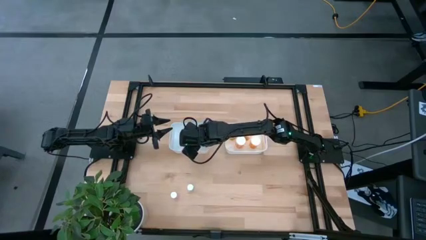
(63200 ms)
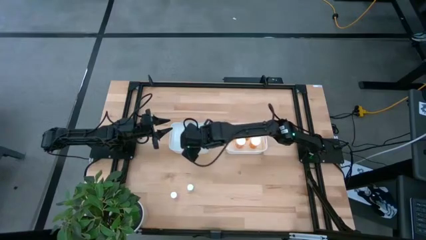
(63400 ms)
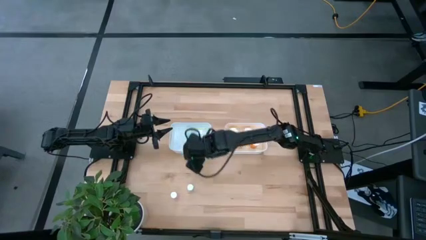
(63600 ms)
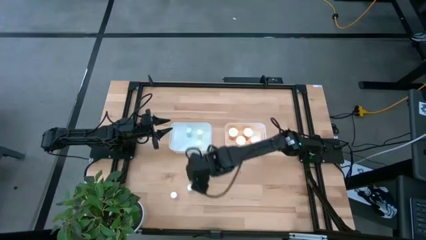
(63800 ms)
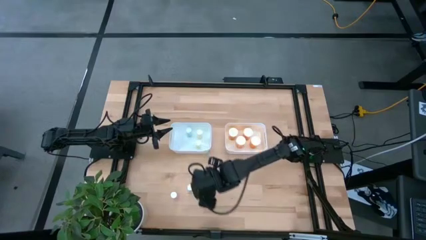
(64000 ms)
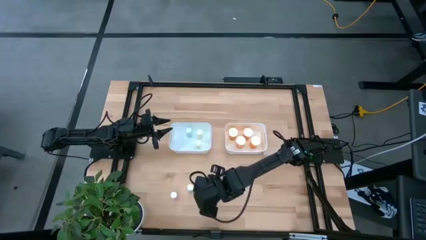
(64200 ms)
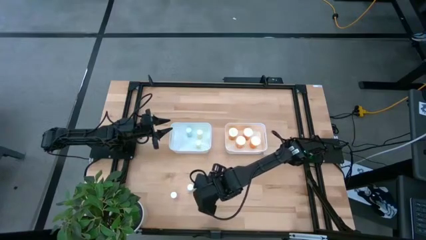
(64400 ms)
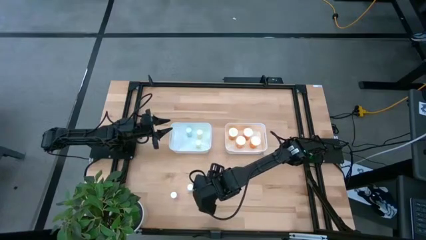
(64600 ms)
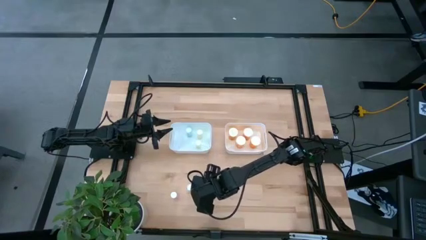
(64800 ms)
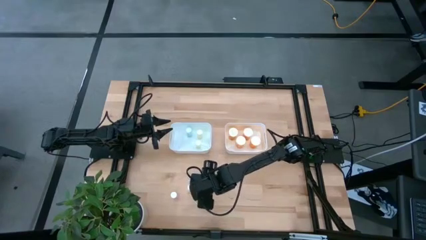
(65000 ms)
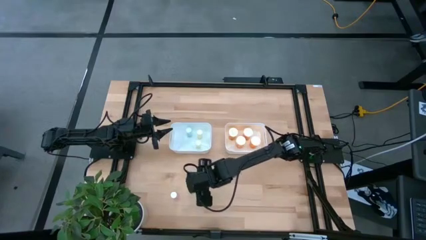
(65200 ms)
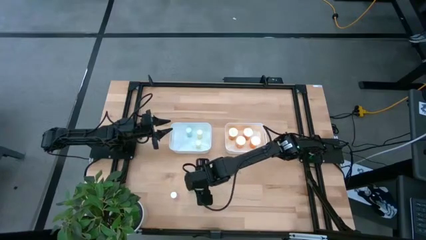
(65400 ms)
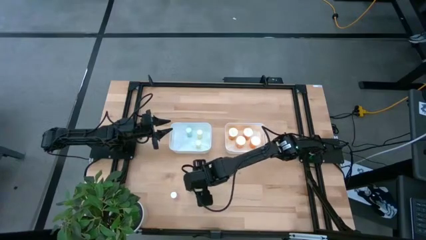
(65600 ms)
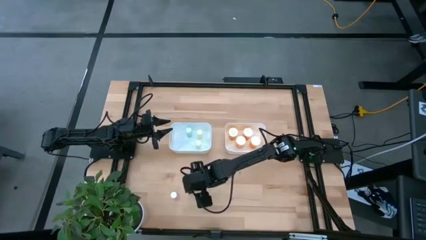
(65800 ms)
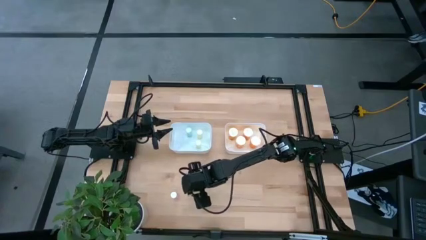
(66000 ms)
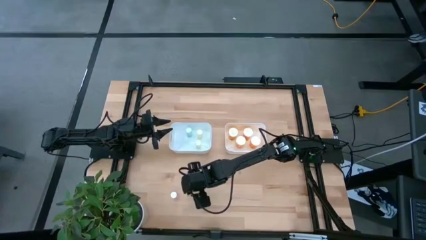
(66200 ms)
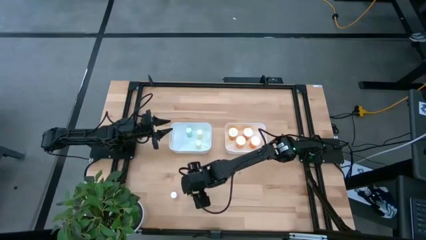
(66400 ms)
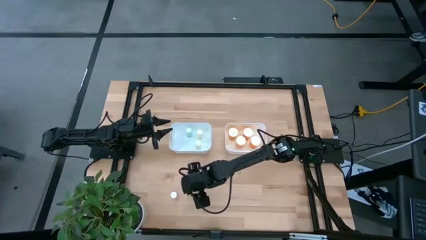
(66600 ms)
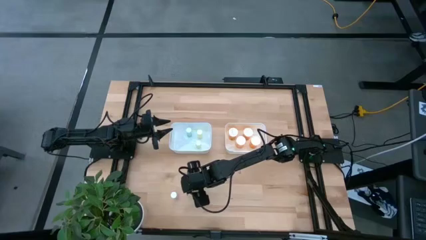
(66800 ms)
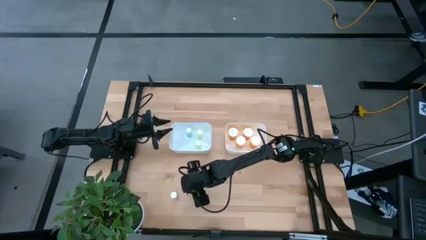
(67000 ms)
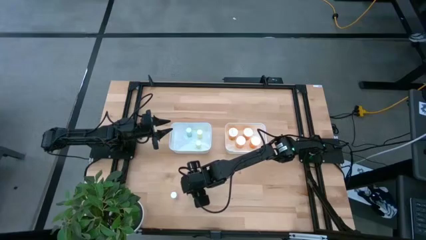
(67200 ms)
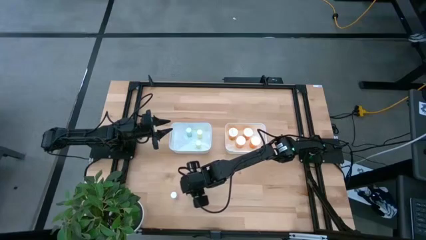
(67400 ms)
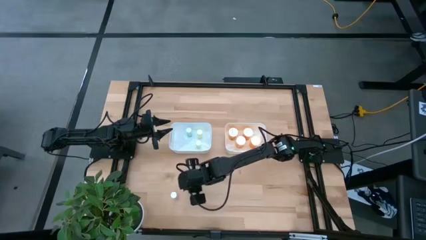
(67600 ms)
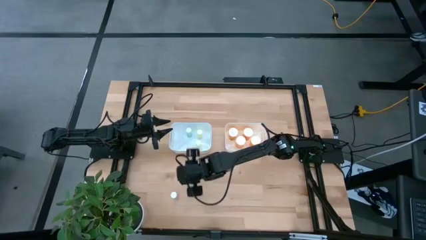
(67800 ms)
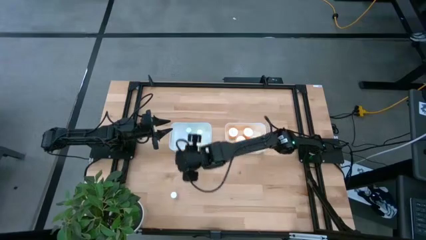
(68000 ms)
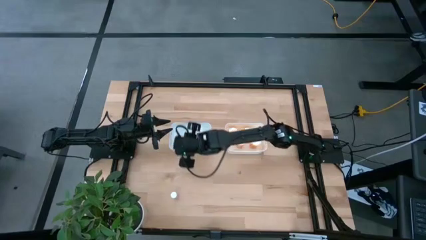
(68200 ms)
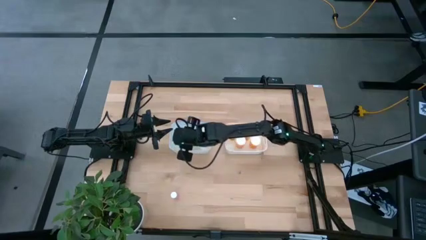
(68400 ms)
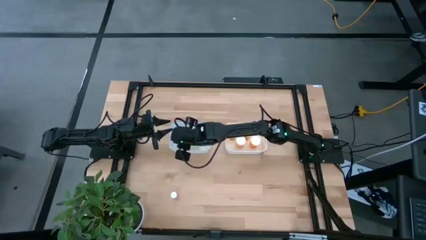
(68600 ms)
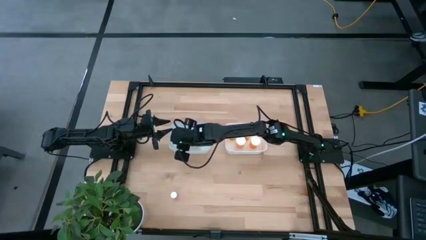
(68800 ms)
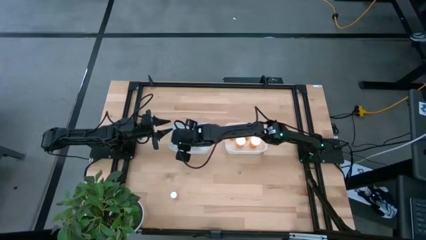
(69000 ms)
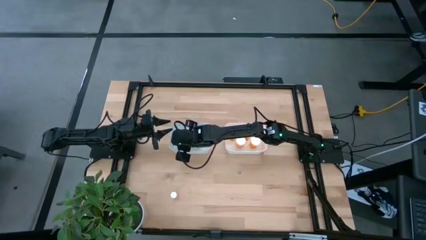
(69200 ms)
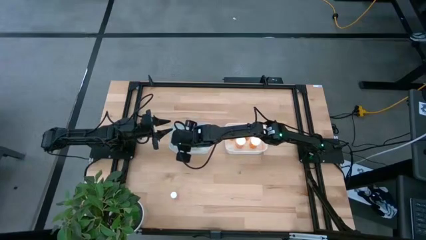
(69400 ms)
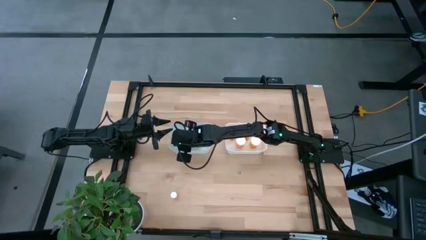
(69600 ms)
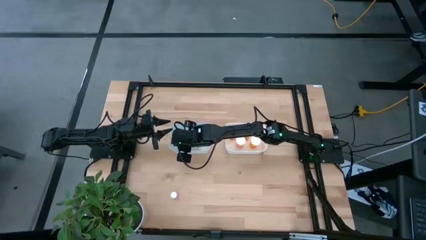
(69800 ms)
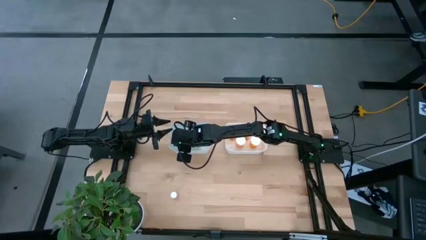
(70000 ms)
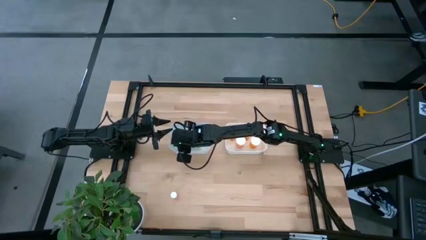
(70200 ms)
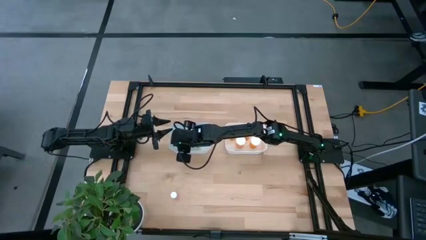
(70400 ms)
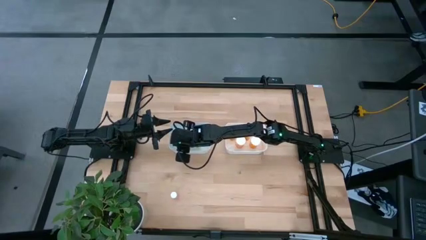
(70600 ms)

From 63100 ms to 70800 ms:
Task: Pick and place medicine bottles into bin by pill shape (circle, oval)
Put the small blue pill bottle into the left white bin

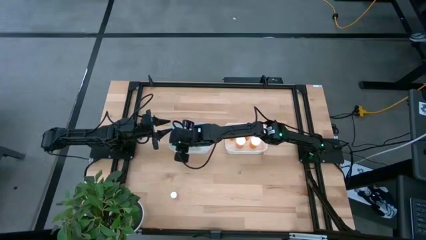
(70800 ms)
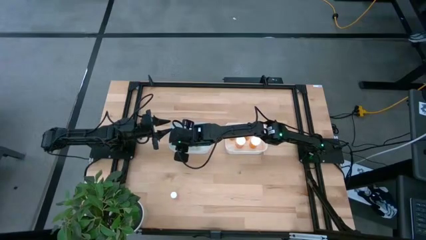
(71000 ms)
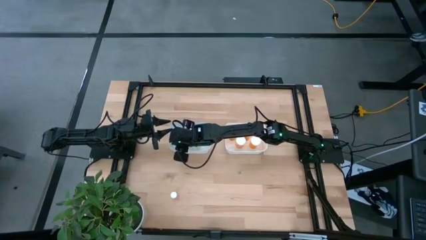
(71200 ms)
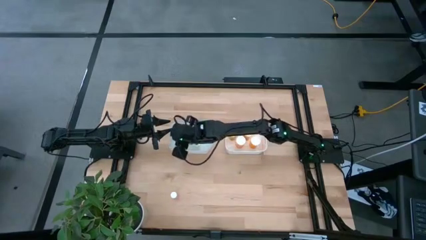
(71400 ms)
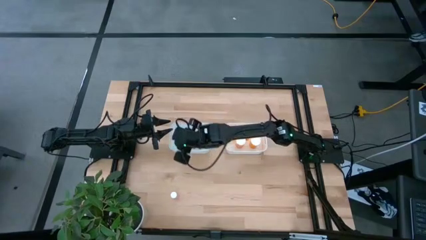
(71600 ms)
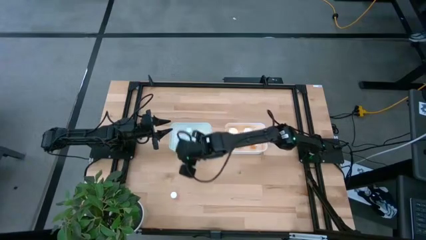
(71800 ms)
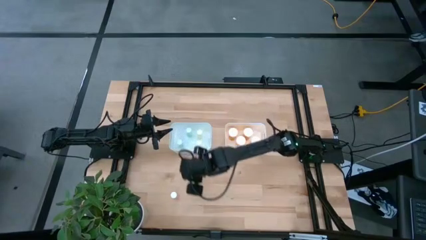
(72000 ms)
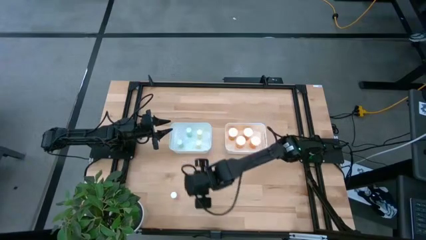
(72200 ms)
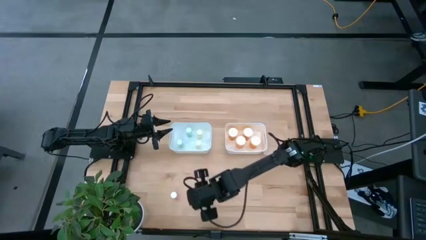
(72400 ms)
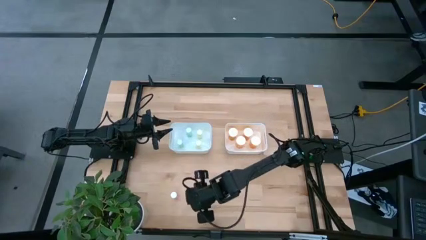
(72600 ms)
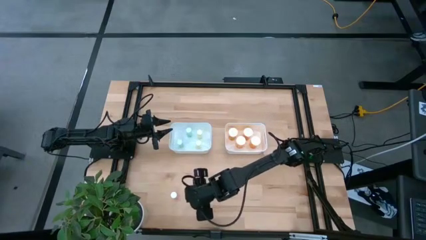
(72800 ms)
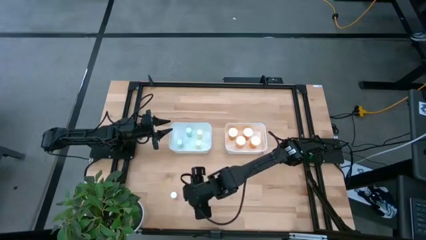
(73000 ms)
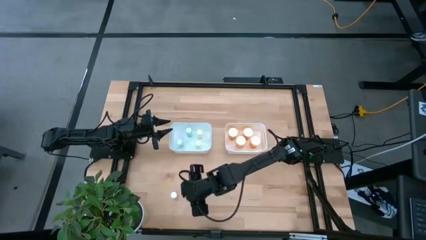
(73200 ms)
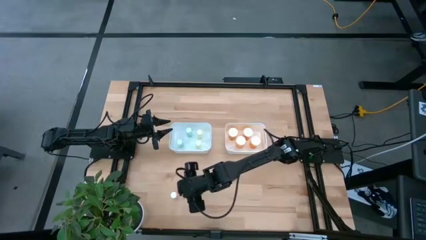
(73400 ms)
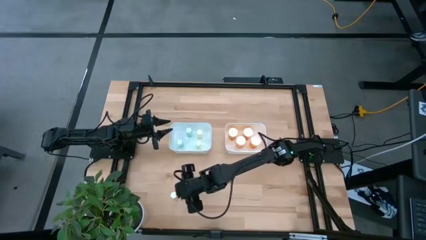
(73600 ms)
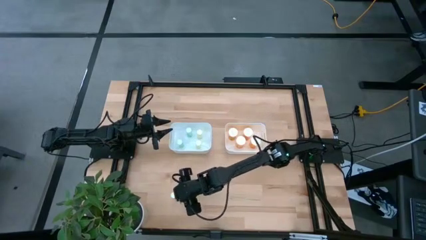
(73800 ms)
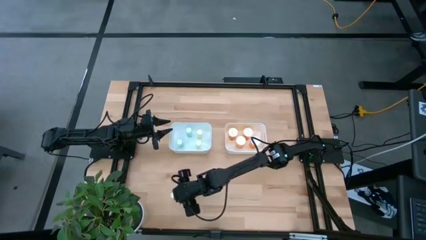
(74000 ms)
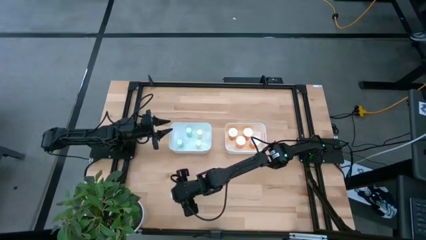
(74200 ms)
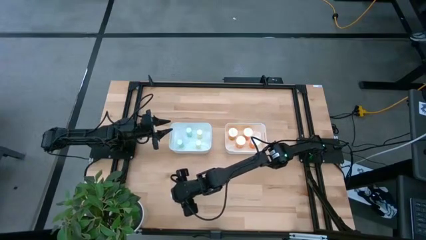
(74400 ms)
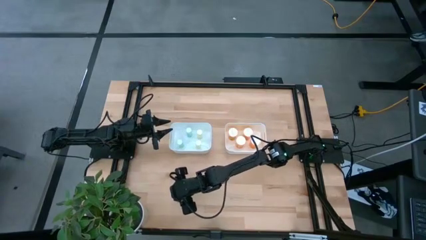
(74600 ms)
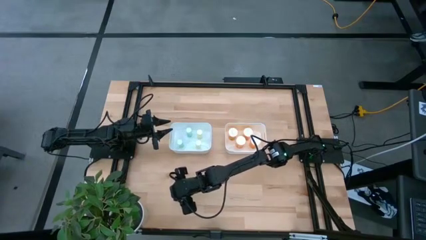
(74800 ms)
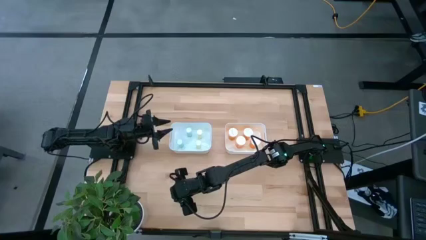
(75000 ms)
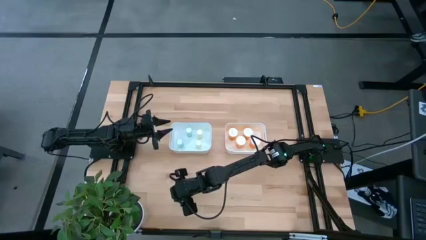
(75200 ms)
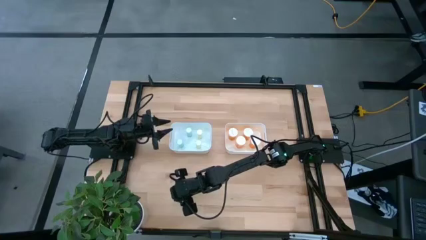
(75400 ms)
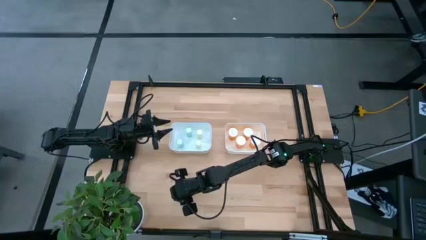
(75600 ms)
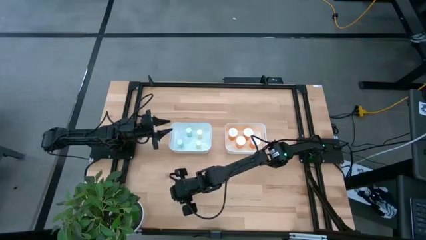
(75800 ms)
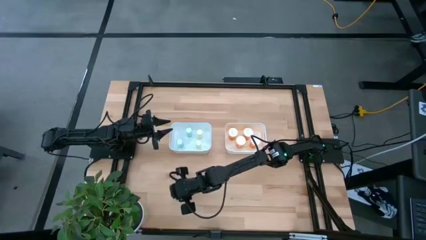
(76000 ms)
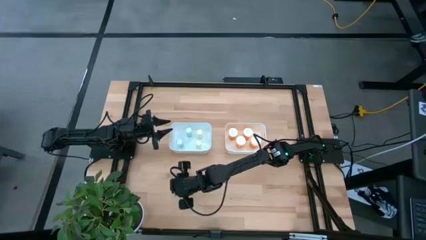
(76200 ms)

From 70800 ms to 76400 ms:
Put the small pink pill bottle into the left white bin
